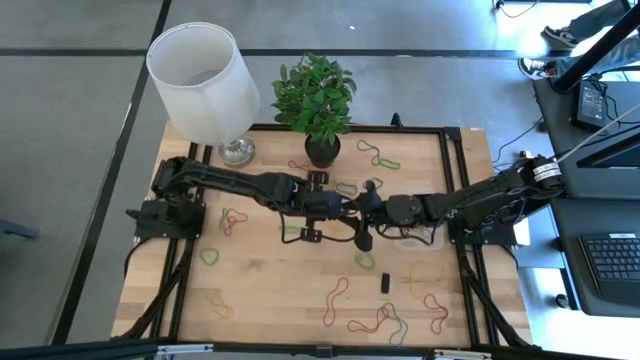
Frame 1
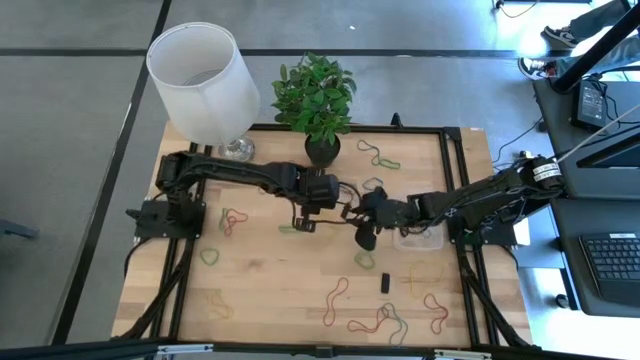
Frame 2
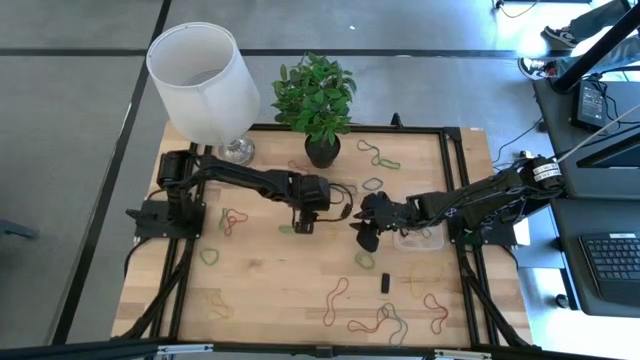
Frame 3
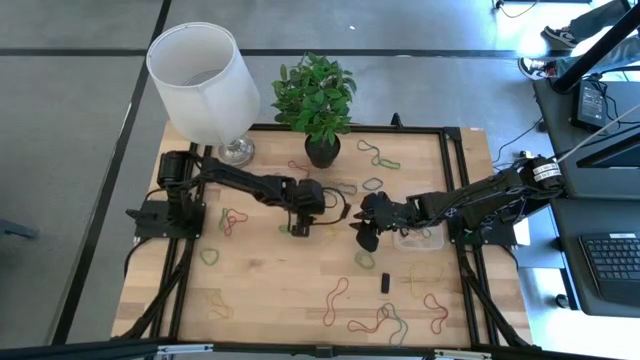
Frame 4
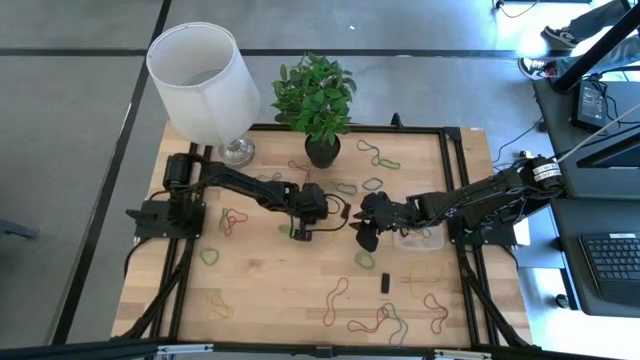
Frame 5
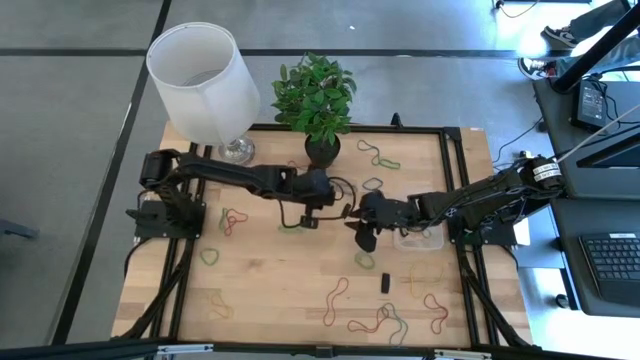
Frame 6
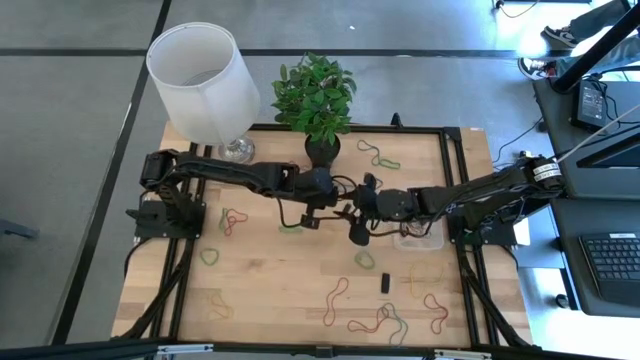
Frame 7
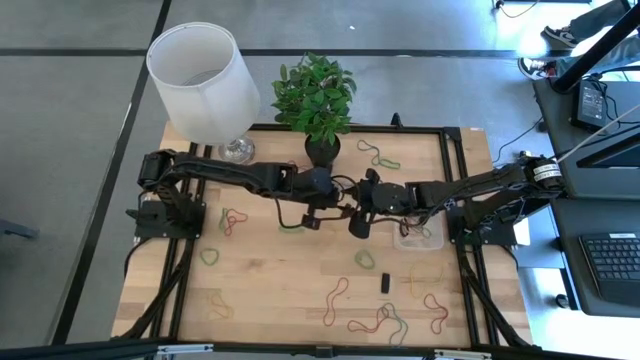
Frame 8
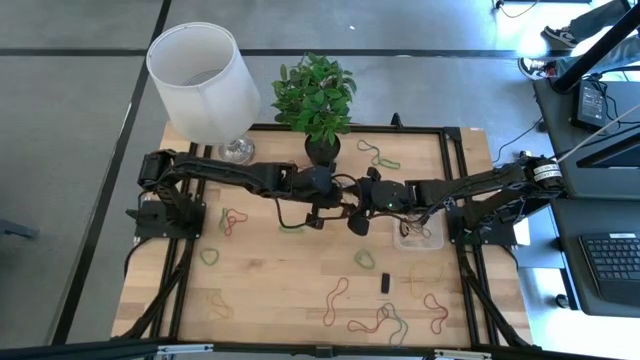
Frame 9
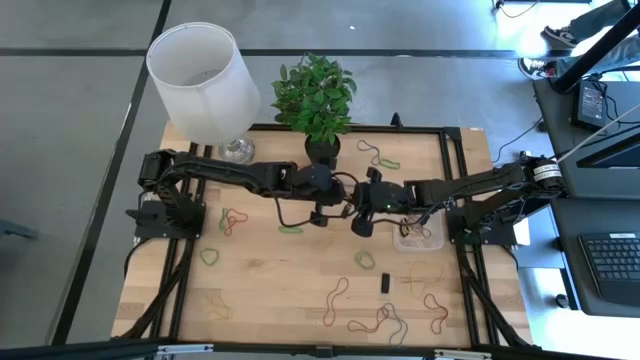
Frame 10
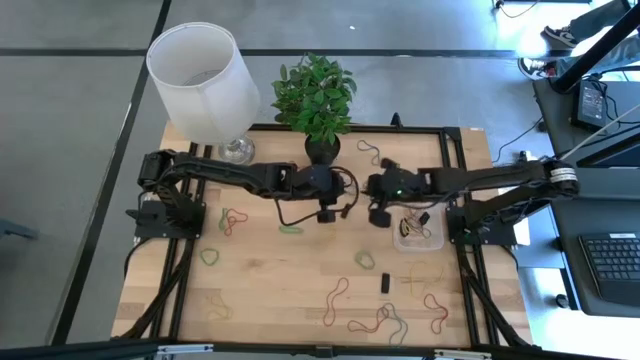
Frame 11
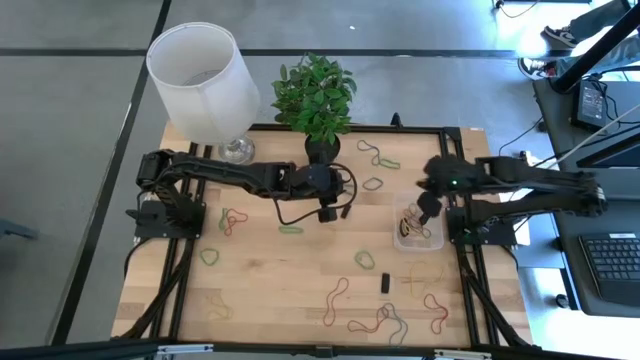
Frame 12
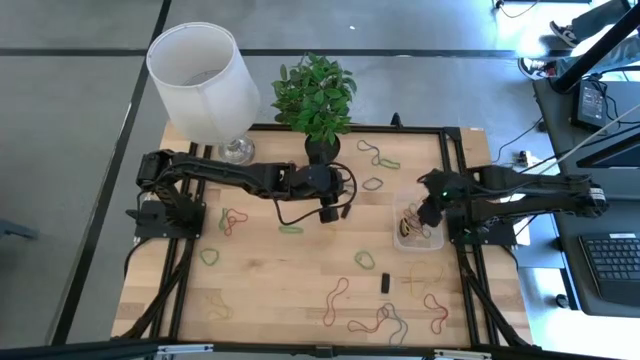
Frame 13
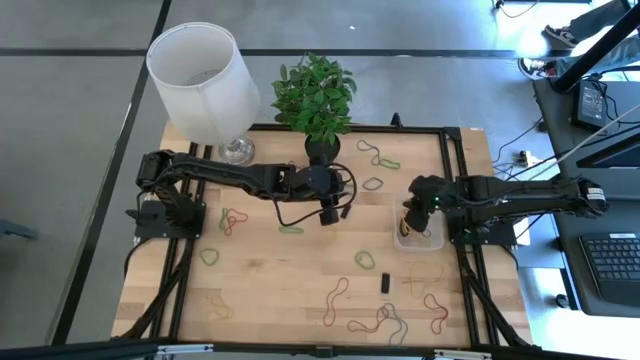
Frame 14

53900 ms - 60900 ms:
Task: Pick and place rubber bands into bin
Put the yellow rubber band into the transparent bin

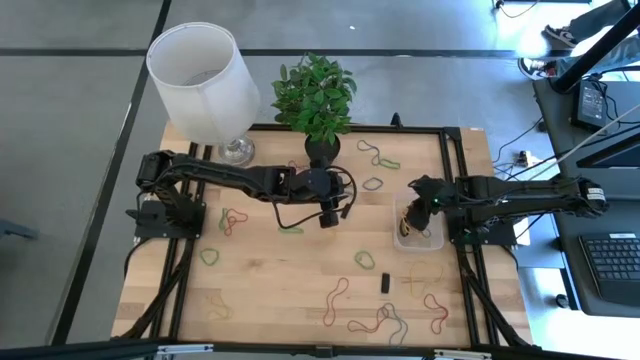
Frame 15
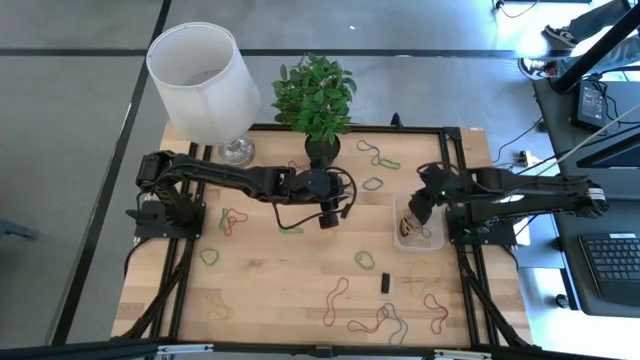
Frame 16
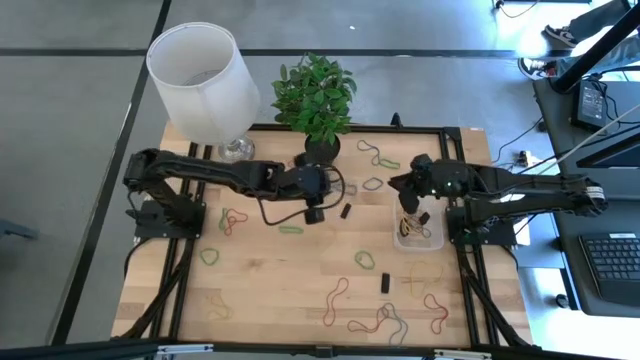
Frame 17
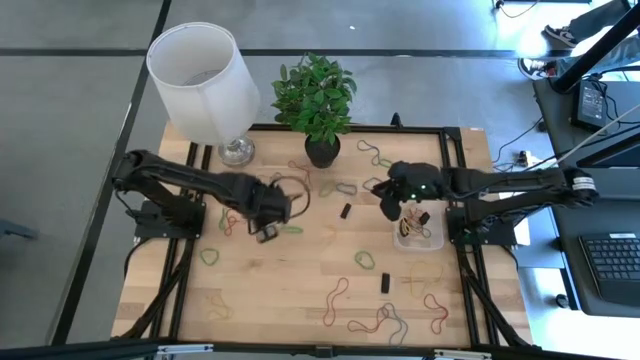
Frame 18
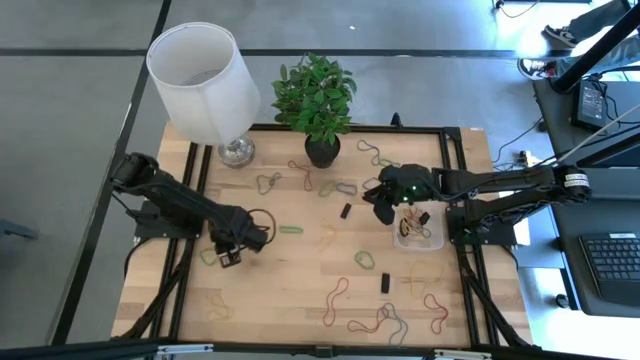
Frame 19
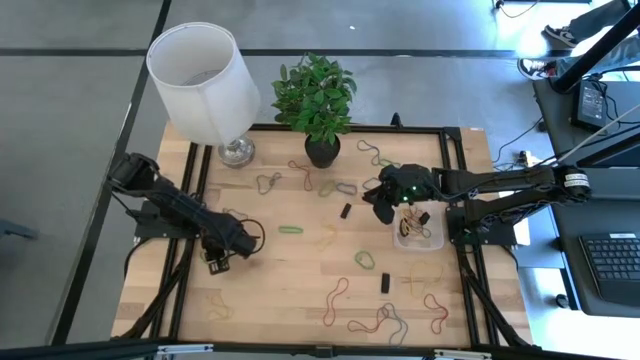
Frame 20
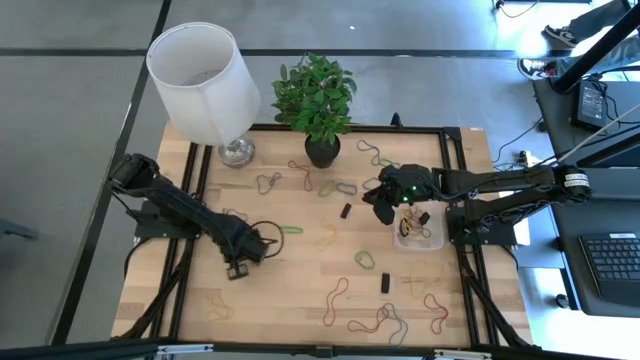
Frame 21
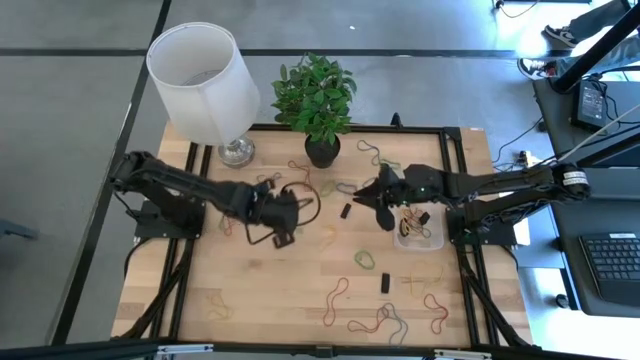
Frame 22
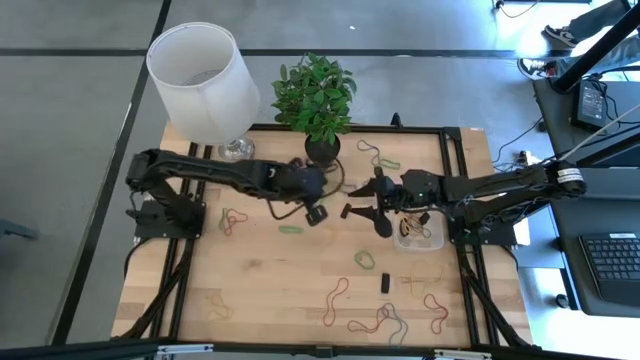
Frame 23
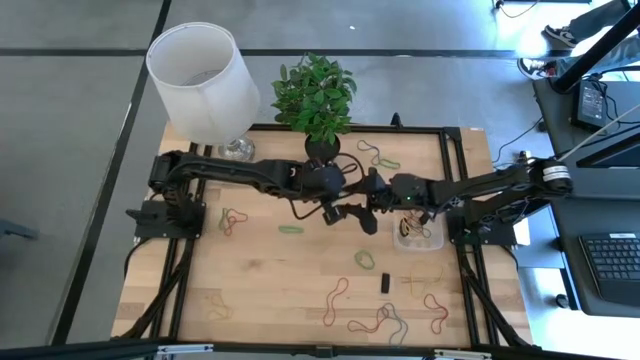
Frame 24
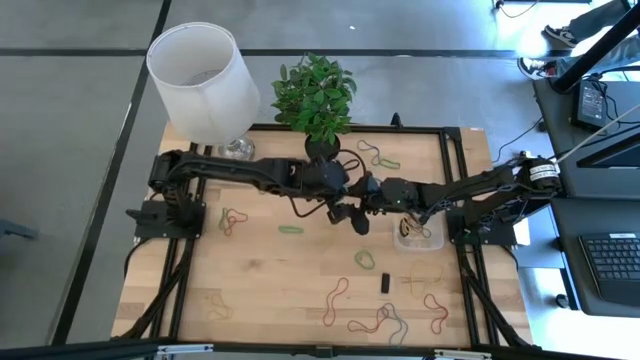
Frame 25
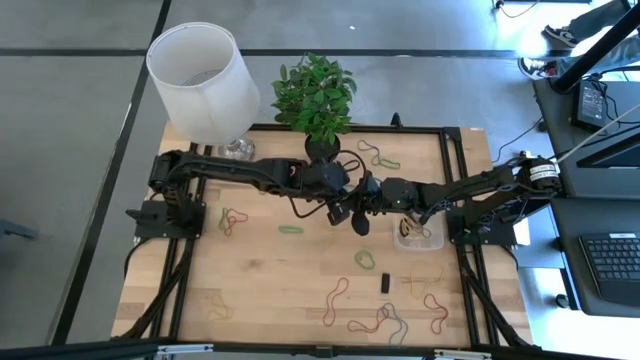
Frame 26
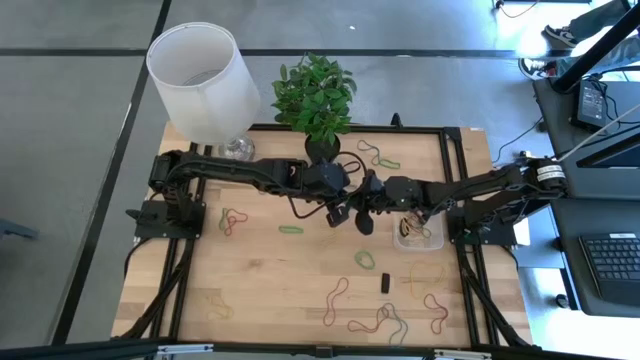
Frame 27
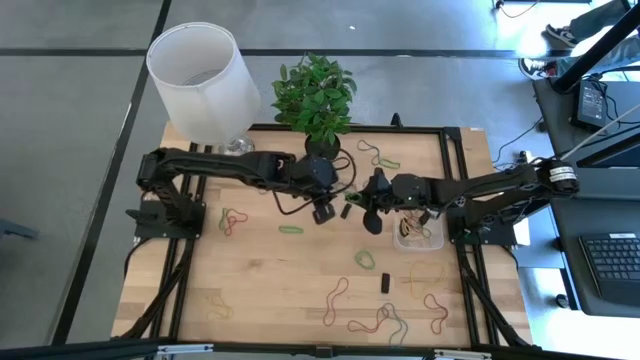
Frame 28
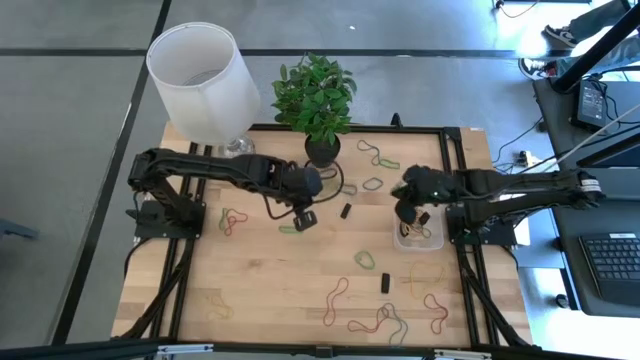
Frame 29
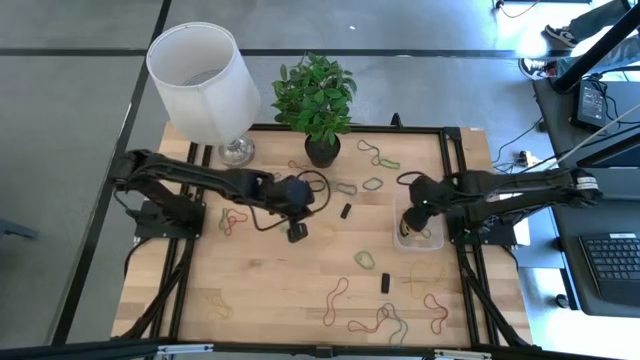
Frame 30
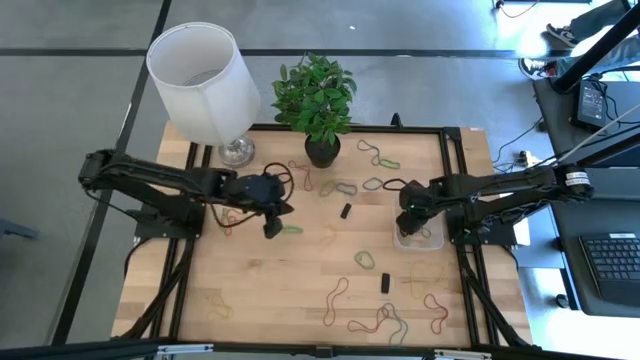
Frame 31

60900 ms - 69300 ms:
Put the green rubber band into the transparent bin

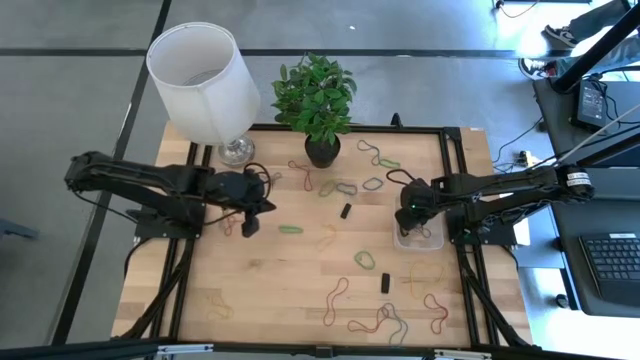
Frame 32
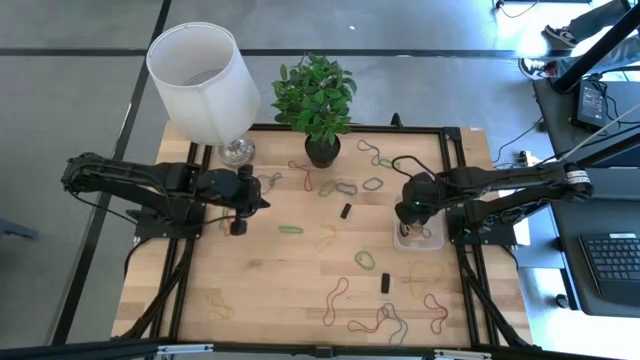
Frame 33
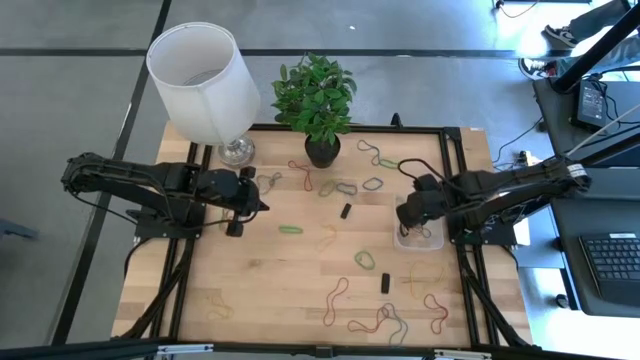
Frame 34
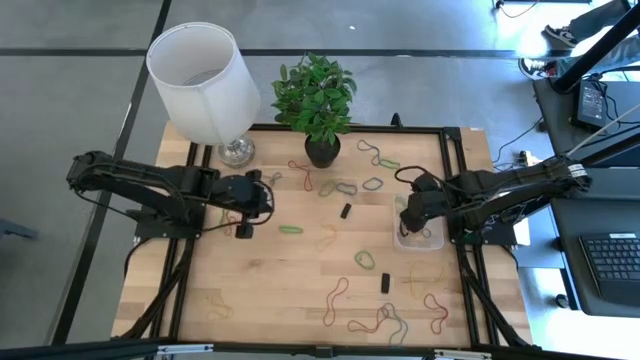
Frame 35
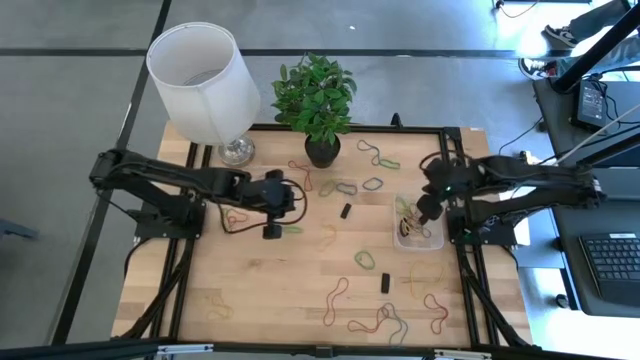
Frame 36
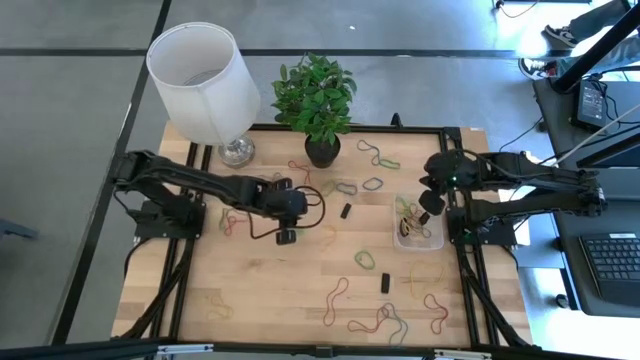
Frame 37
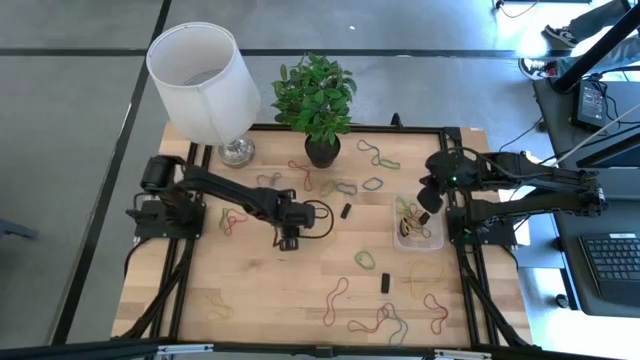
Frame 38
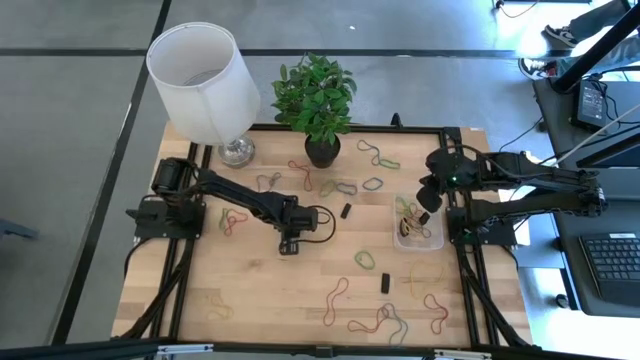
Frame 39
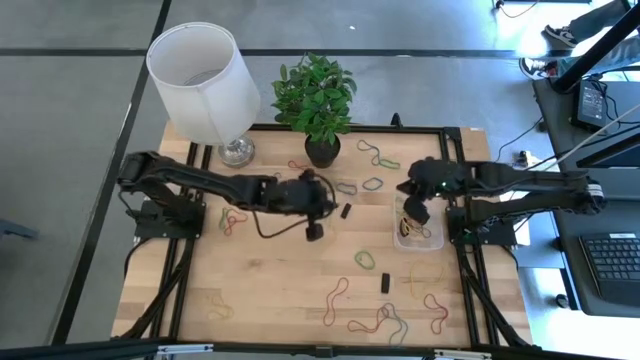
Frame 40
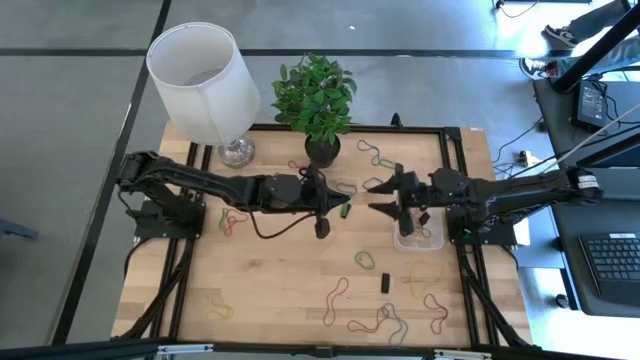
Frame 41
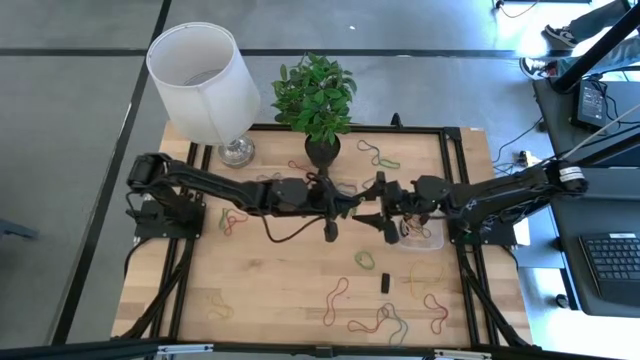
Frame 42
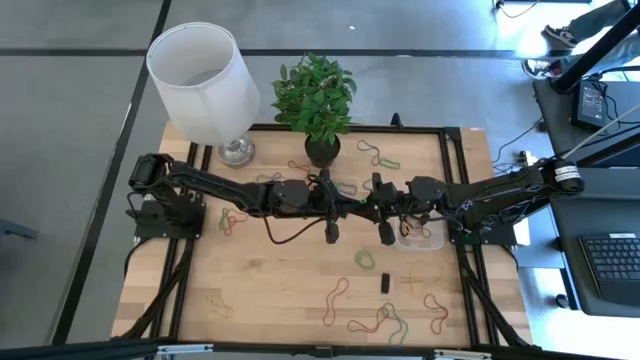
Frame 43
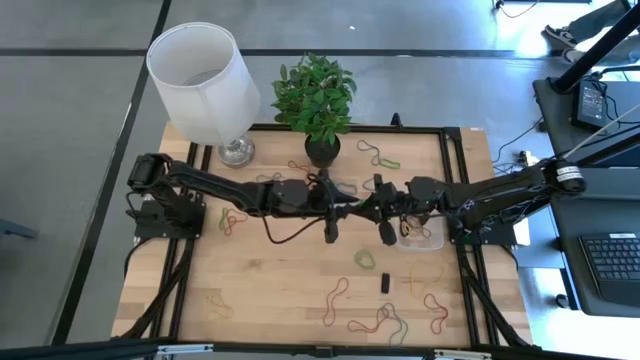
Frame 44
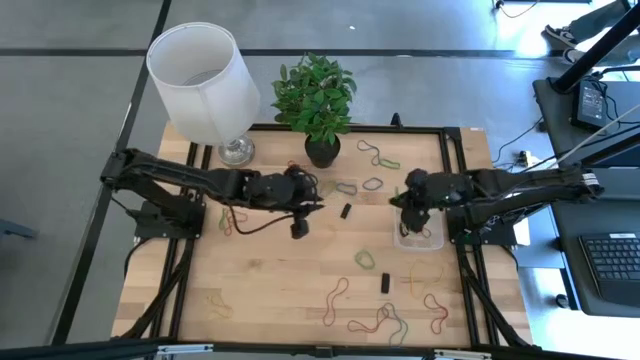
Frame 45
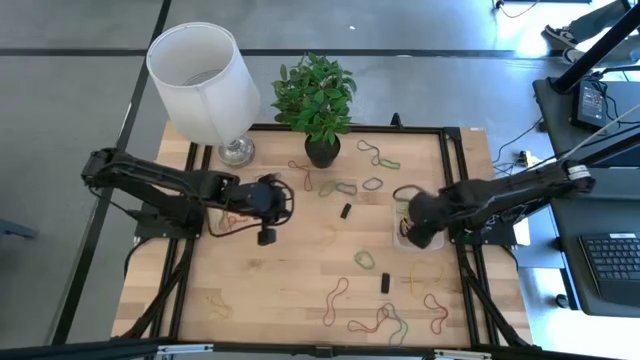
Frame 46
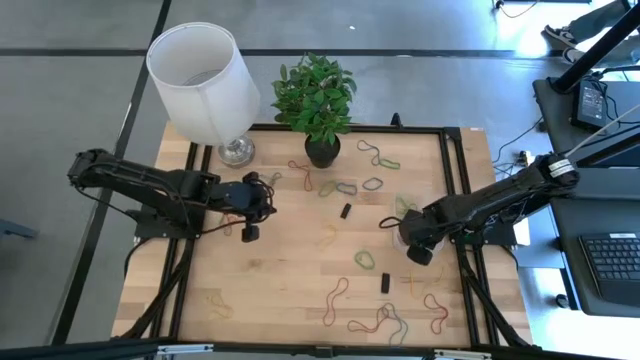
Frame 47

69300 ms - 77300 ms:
Put the green rubber band into the transparent bin
